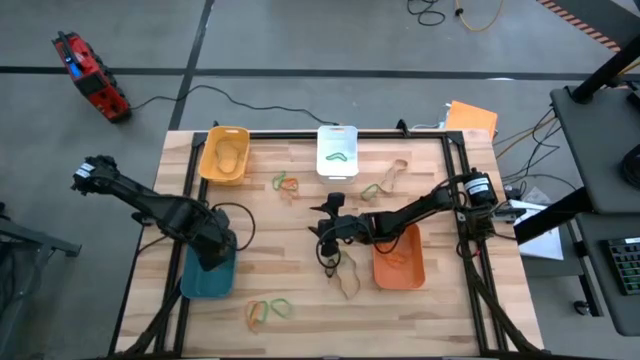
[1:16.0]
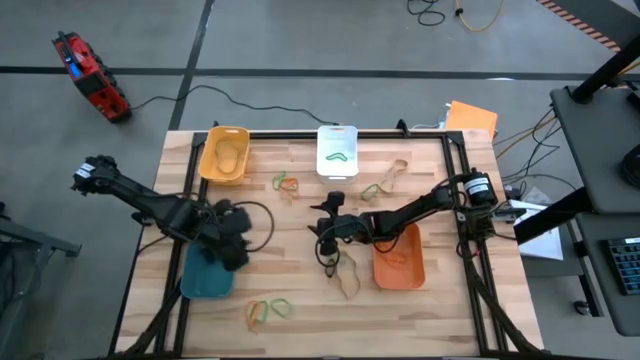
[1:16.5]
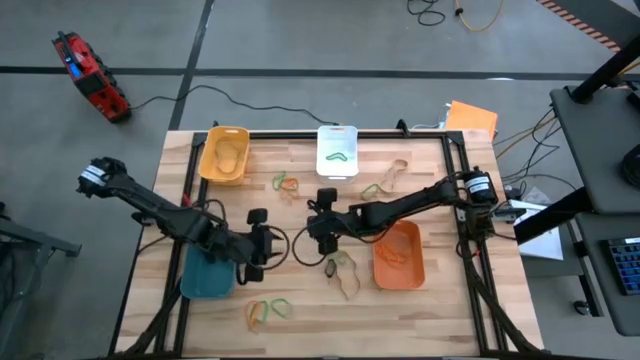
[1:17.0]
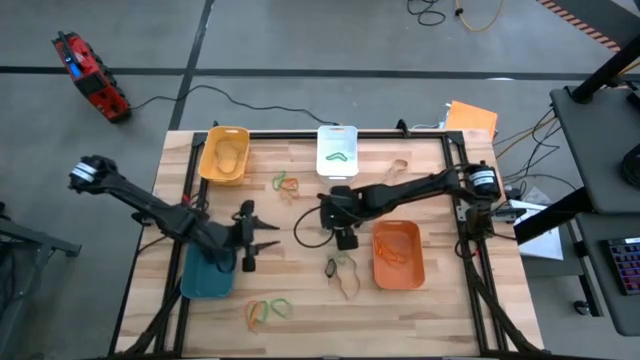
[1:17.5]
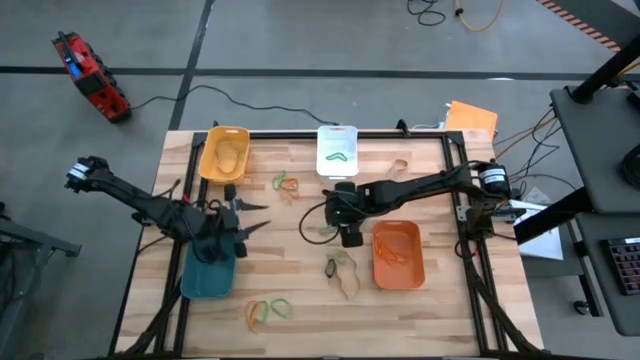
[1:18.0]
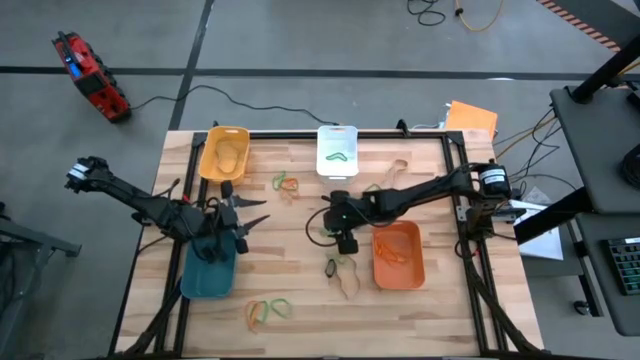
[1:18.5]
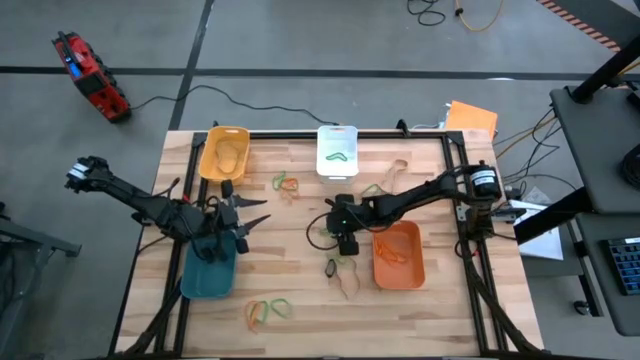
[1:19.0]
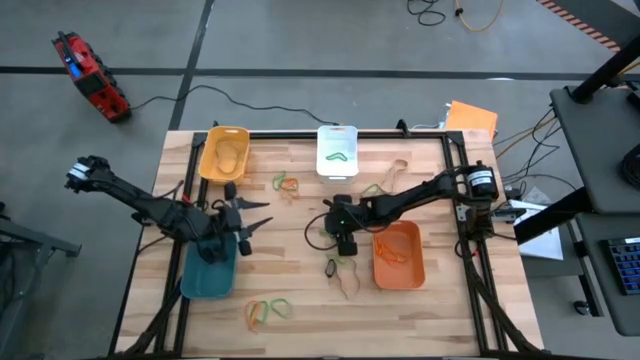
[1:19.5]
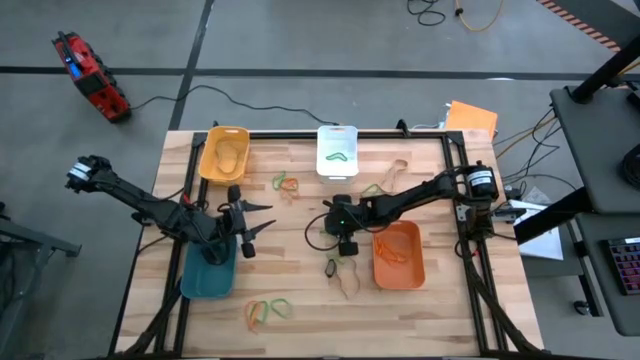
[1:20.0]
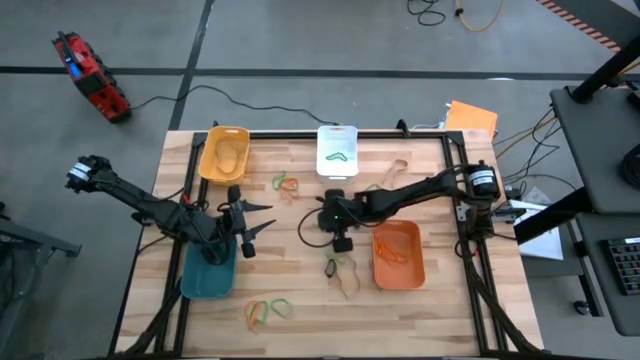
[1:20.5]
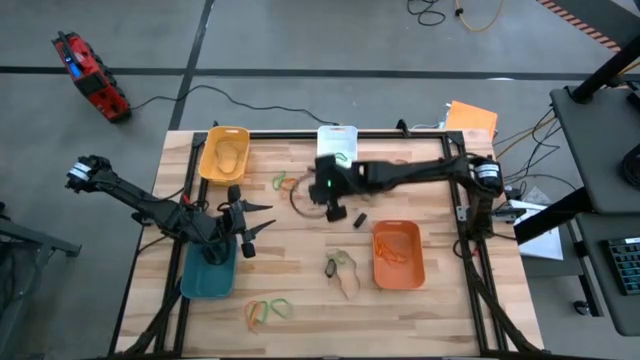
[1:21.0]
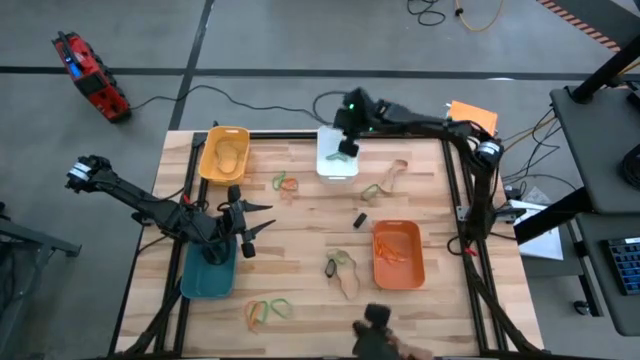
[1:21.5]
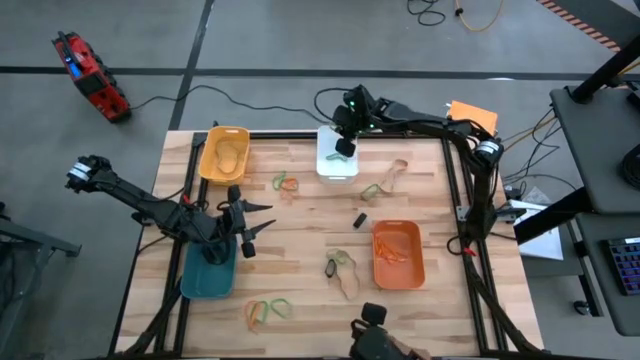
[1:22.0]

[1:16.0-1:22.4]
Task: Sort rubber bands into baskets
Put the green rubber band into the white bin

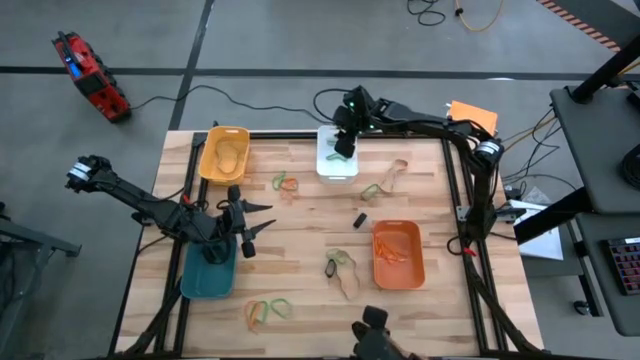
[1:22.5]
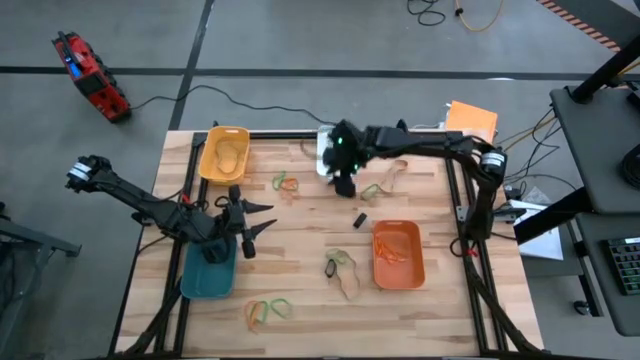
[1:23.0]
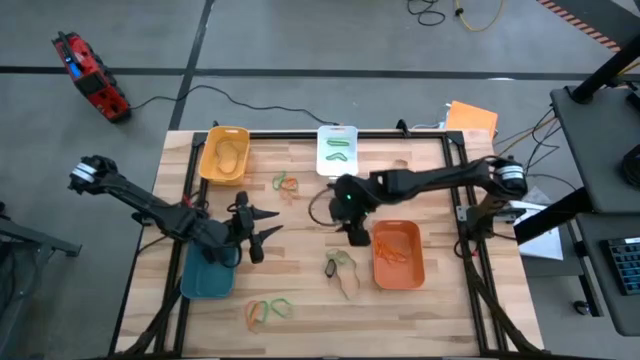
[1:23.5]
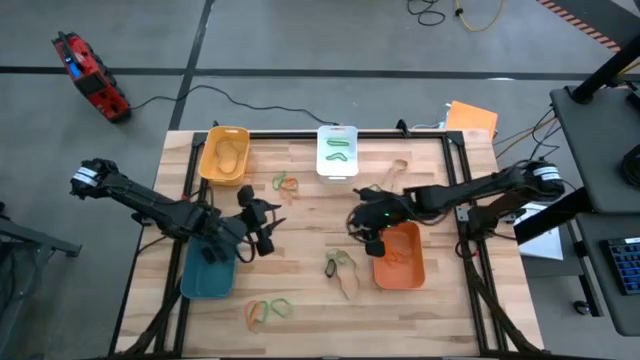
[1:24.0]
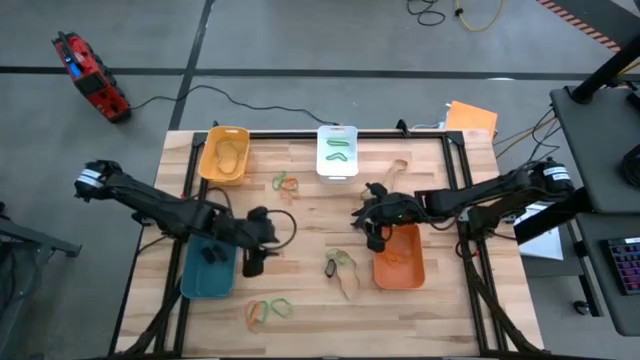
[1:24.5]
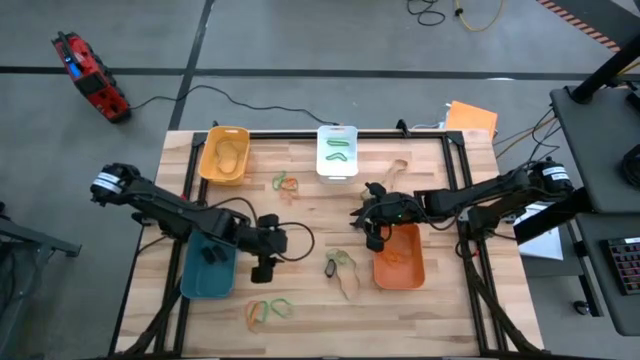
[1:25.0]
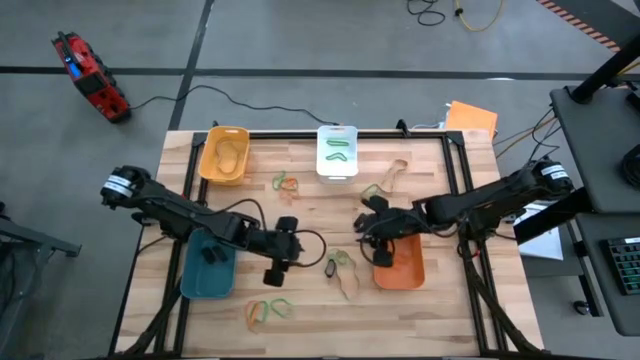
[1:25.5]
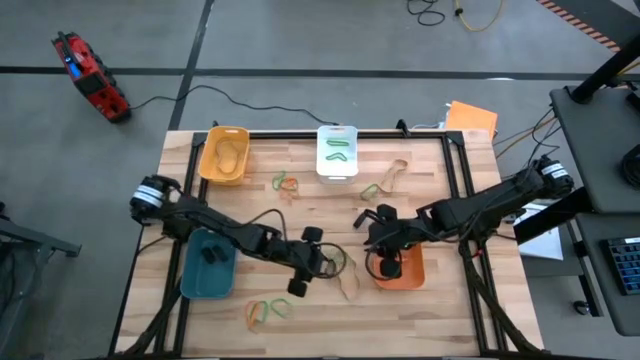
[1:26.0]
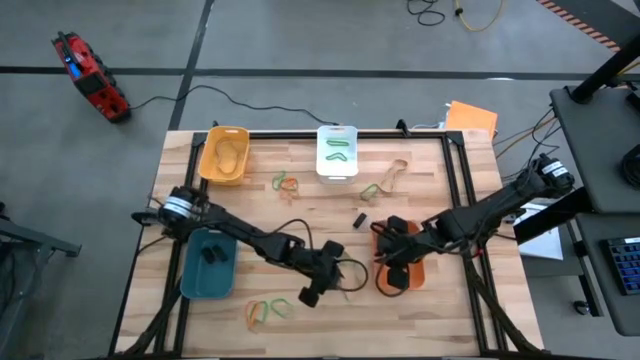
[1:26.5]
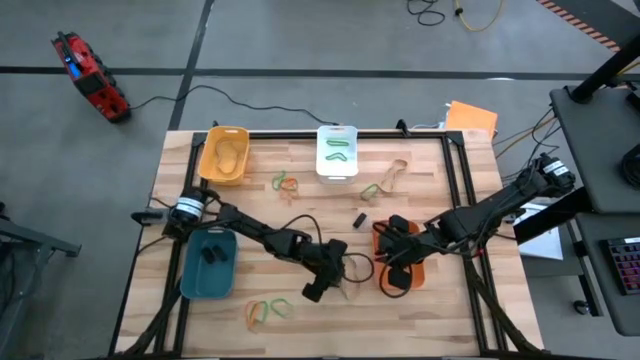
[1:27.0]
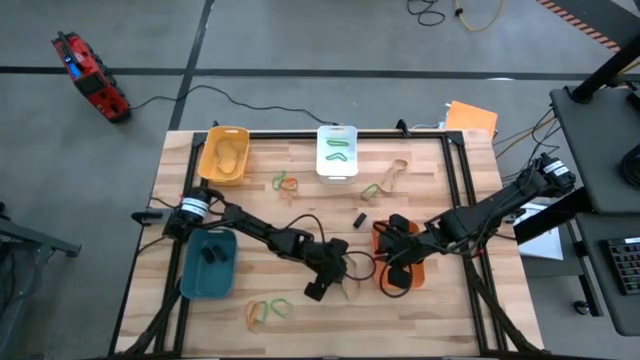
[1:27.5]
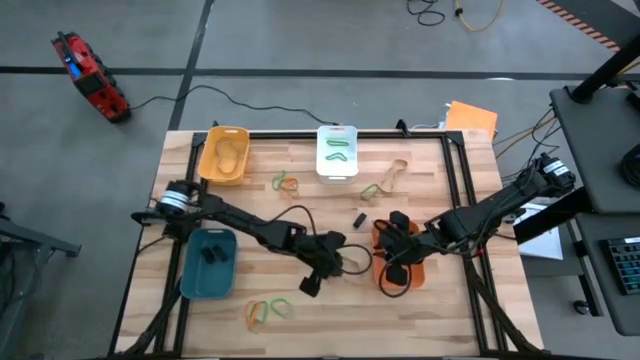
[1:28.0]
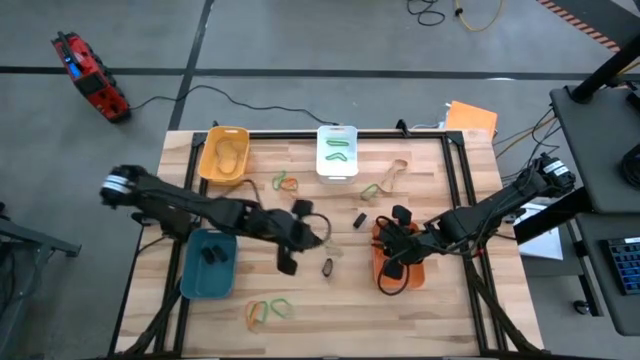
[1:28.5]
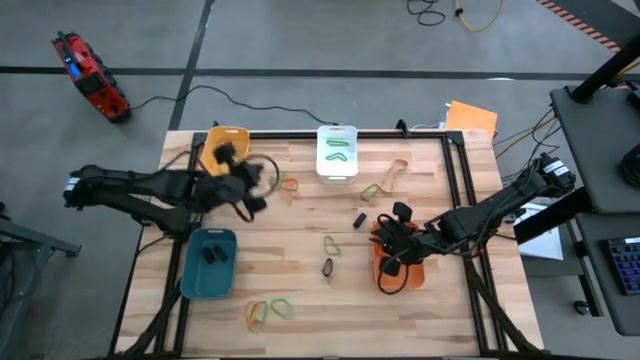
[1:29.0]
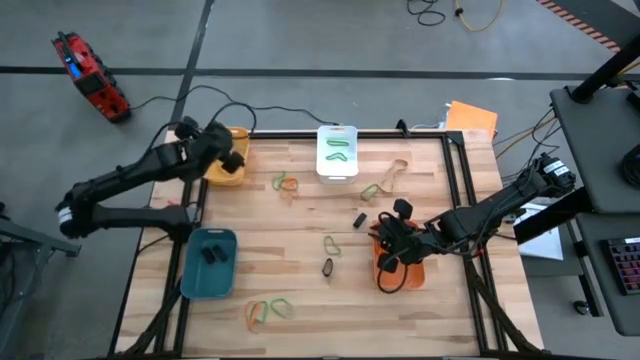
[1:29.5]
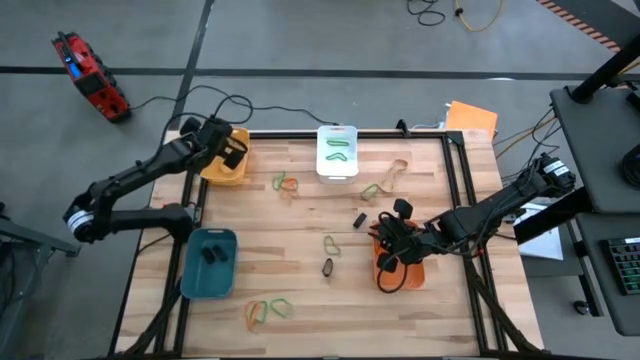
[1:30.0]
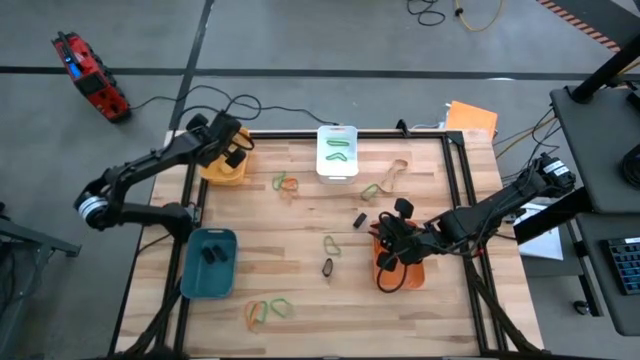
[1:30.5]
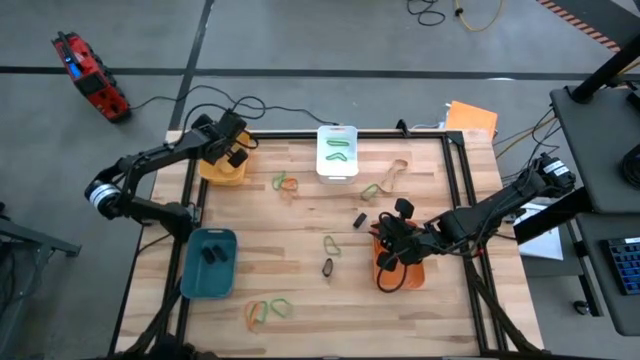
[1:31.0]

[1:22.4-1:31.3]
Put the middle light brown rubber band into the yellow bin

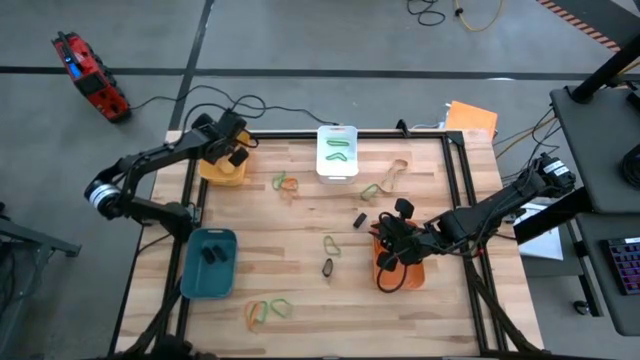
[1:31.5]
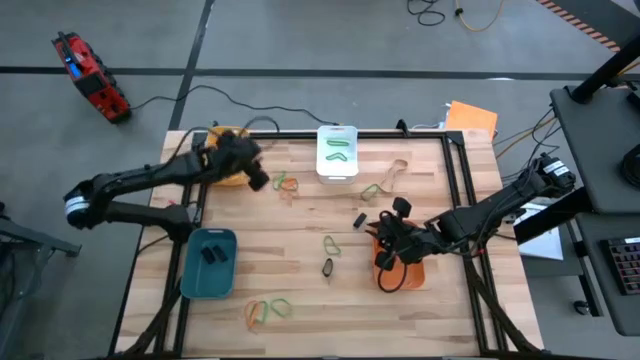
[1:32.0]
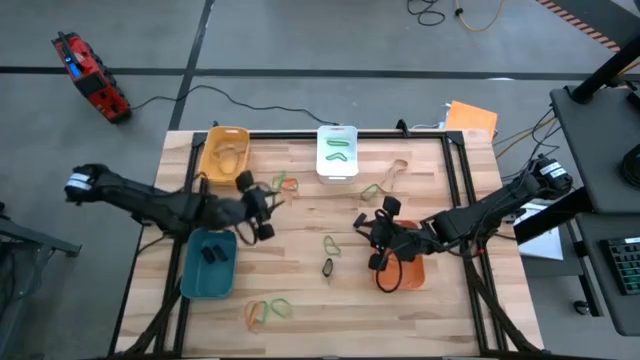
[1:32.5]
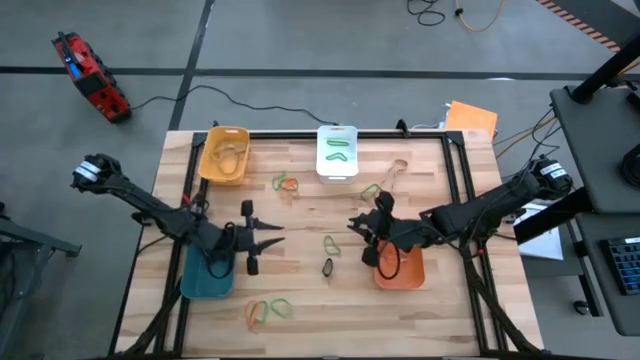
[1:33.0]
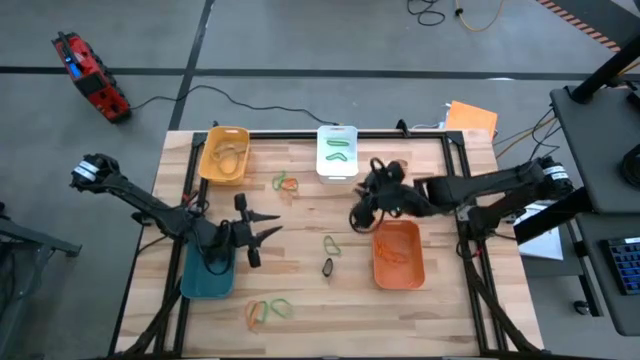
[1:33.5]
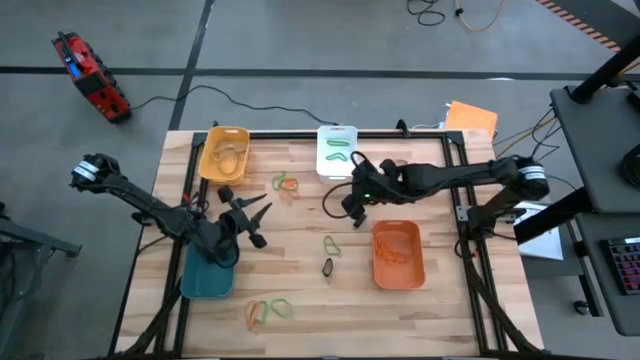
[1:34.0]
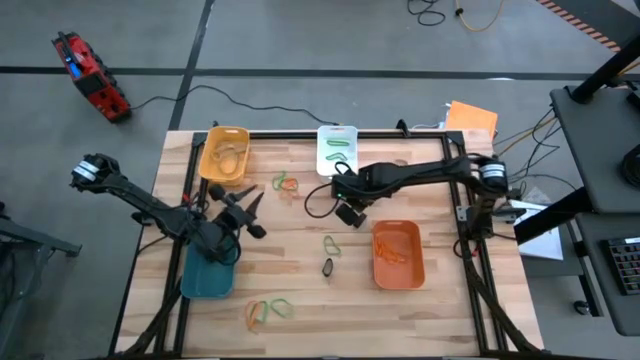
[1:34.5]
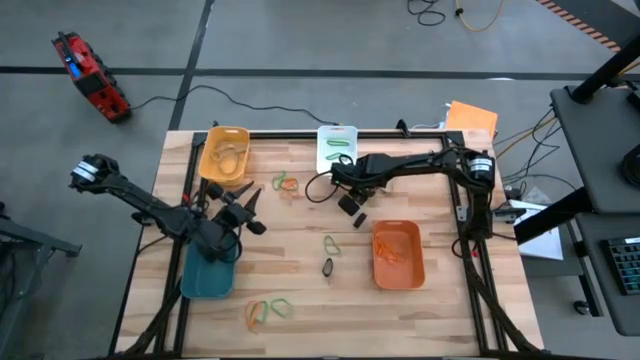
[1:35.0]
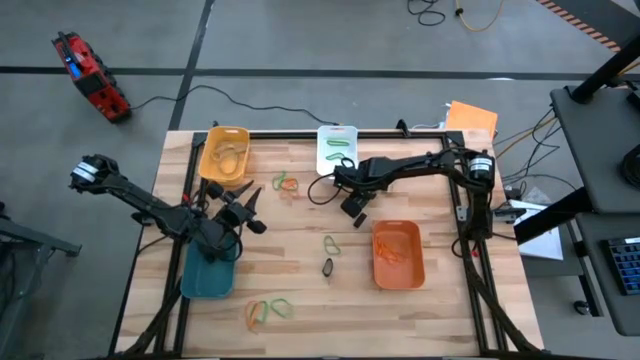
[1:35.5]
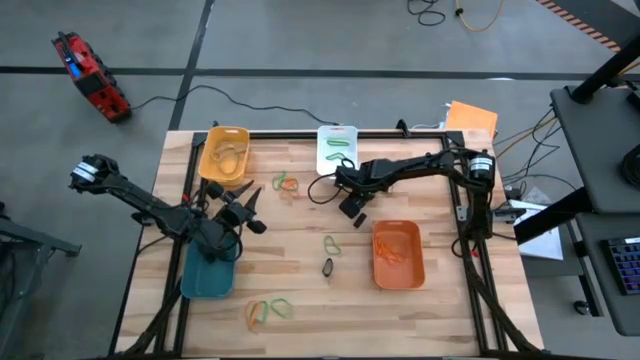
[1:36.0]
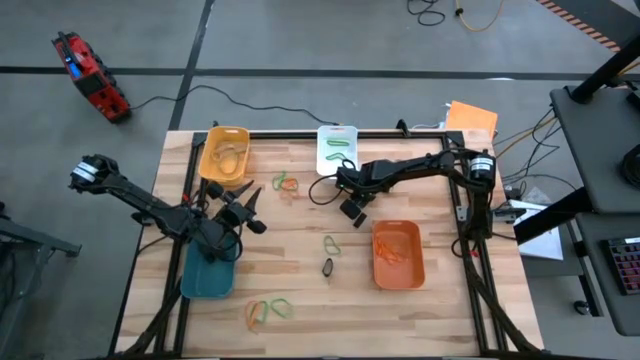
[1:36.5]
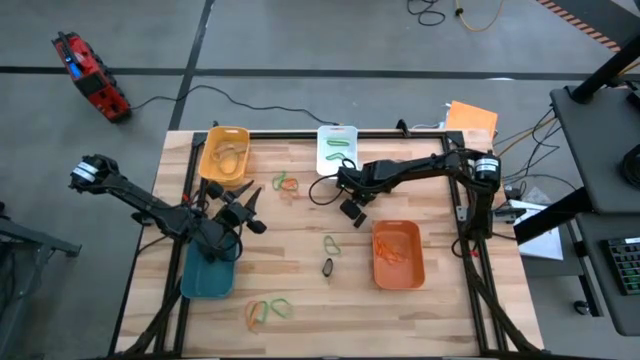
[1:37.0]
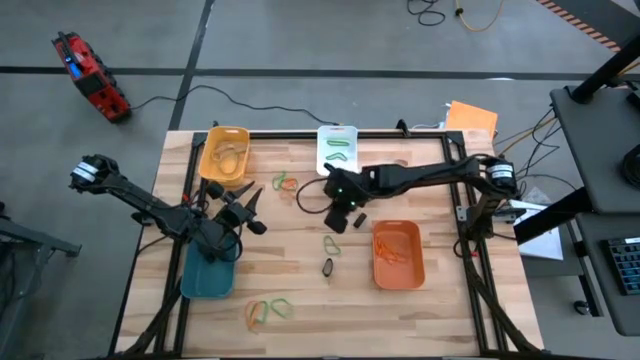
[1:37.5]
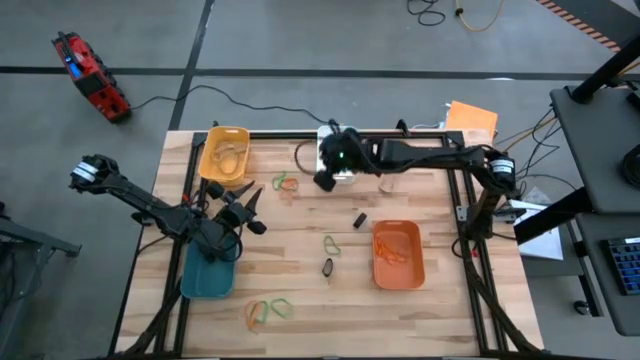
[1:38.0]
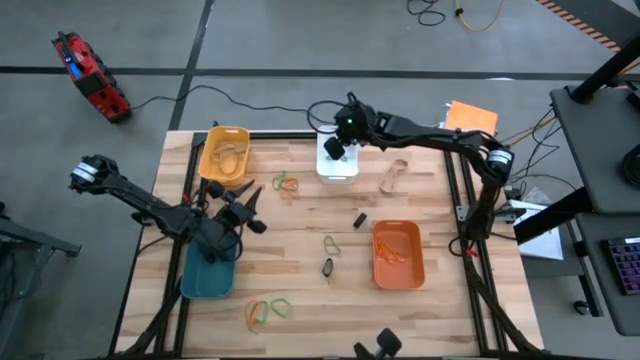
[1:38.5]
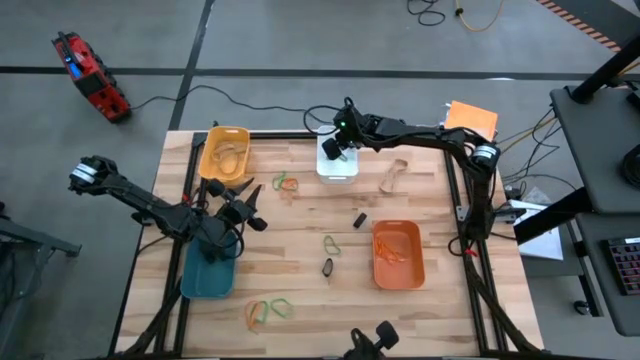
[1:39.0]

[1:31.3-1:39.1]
Put the green rubber band into the white bin
